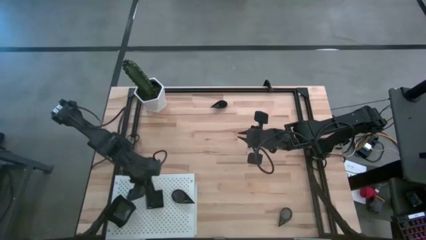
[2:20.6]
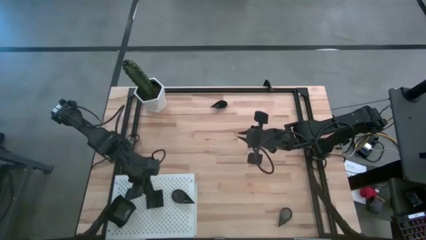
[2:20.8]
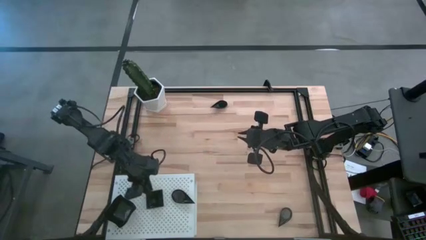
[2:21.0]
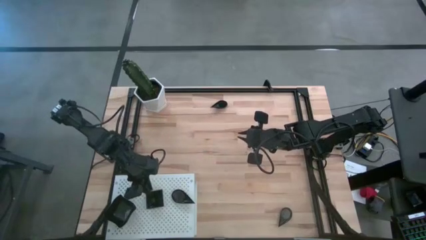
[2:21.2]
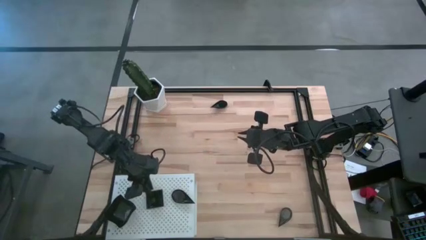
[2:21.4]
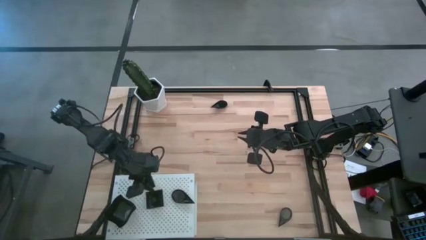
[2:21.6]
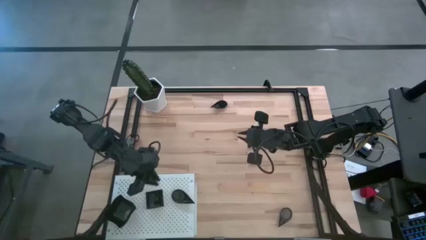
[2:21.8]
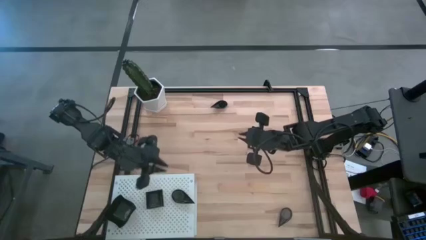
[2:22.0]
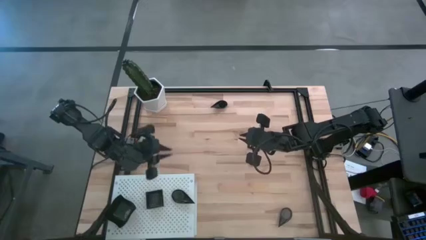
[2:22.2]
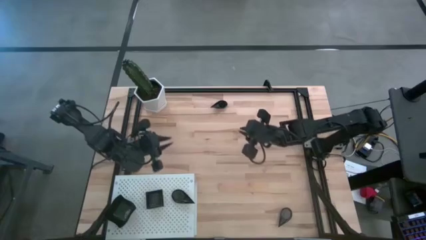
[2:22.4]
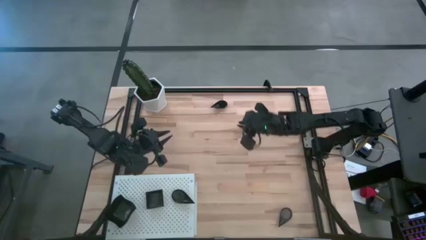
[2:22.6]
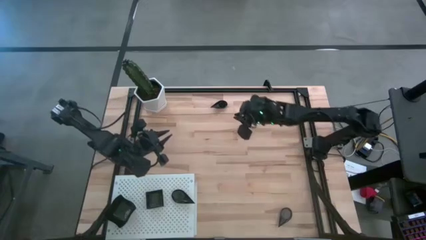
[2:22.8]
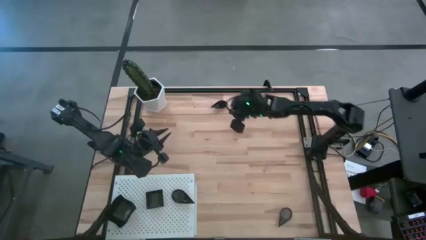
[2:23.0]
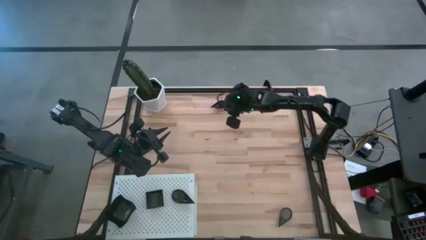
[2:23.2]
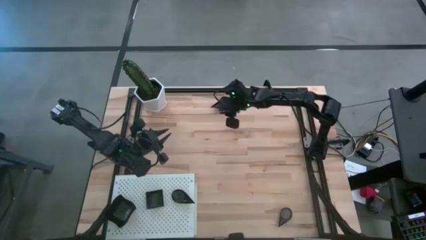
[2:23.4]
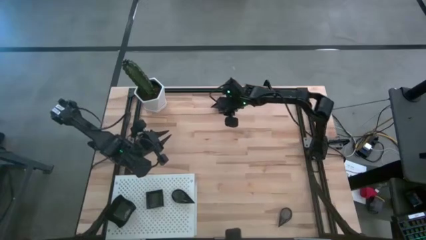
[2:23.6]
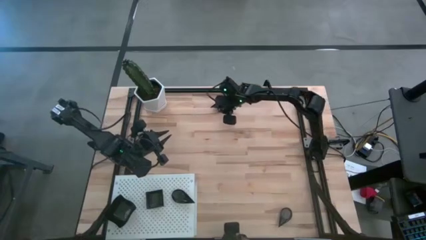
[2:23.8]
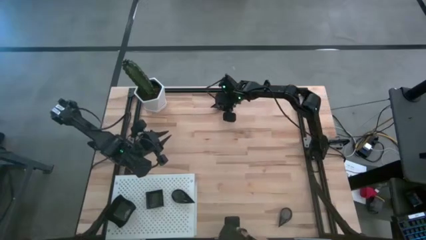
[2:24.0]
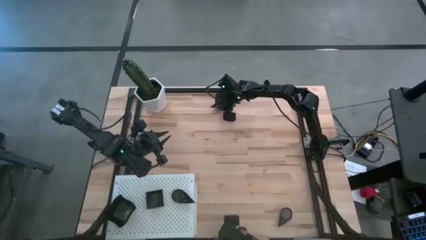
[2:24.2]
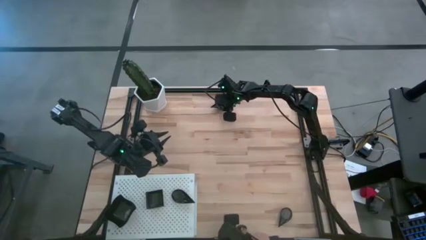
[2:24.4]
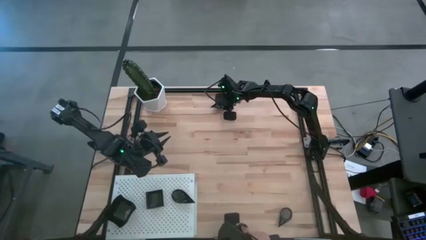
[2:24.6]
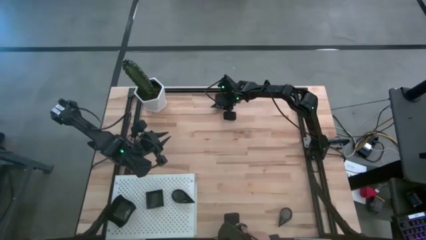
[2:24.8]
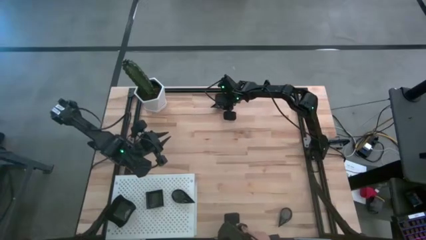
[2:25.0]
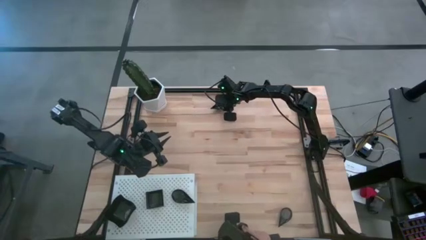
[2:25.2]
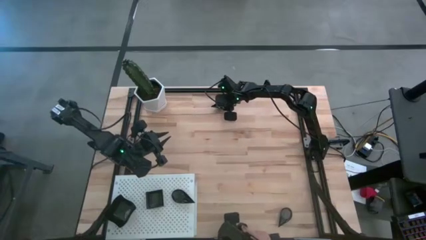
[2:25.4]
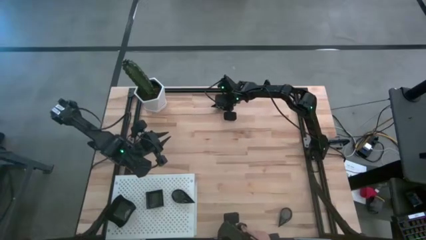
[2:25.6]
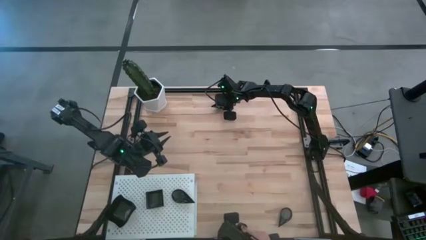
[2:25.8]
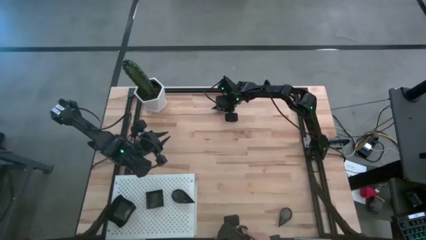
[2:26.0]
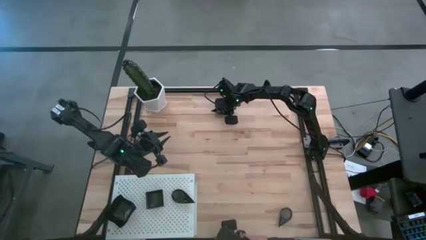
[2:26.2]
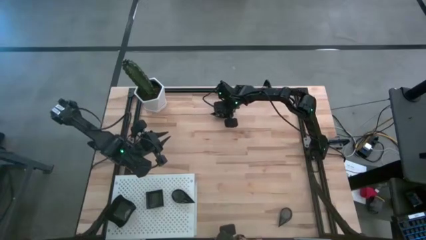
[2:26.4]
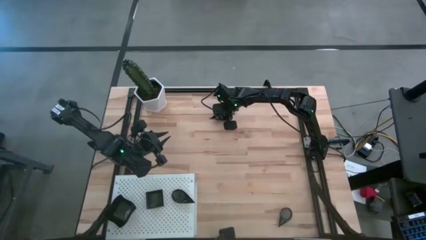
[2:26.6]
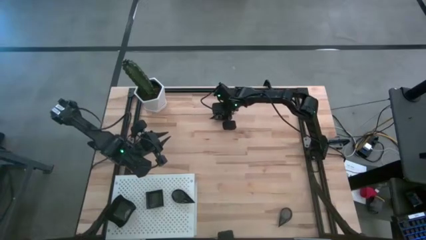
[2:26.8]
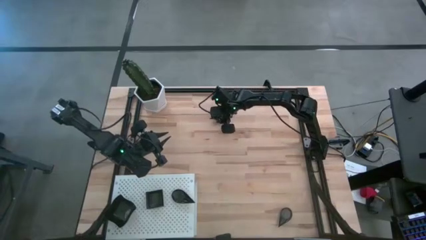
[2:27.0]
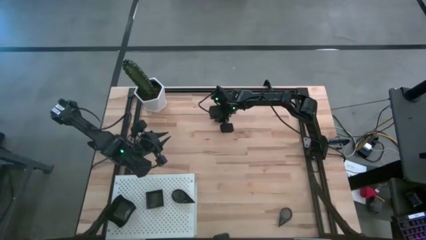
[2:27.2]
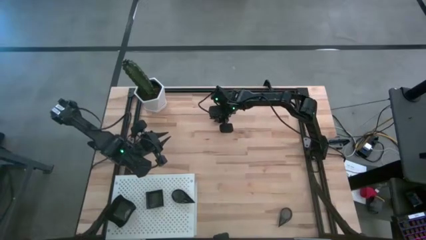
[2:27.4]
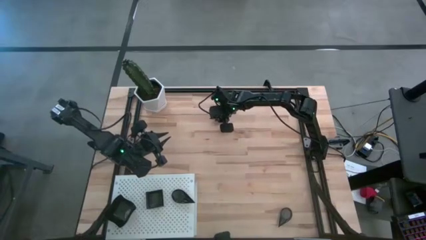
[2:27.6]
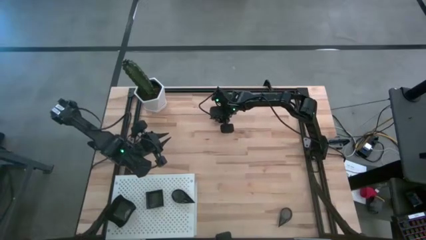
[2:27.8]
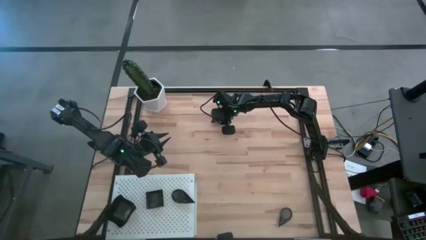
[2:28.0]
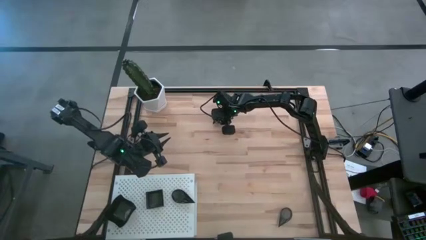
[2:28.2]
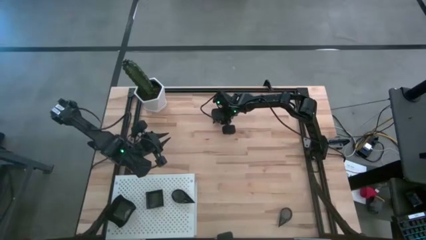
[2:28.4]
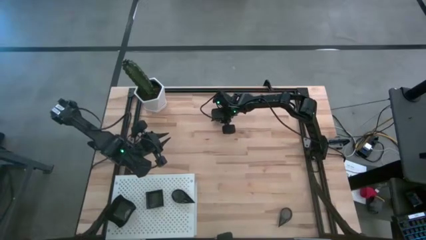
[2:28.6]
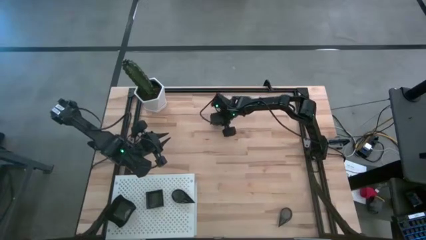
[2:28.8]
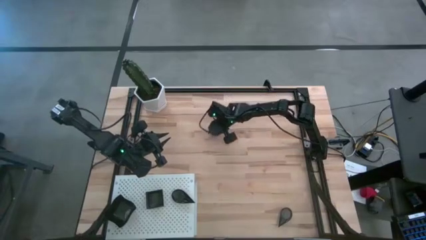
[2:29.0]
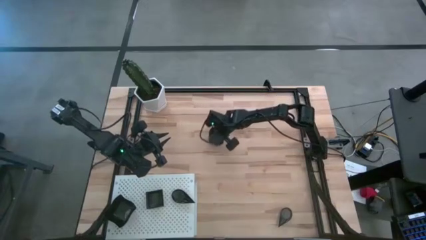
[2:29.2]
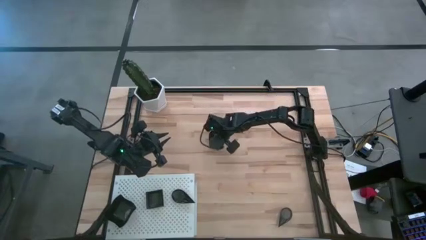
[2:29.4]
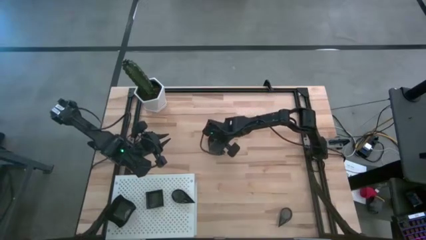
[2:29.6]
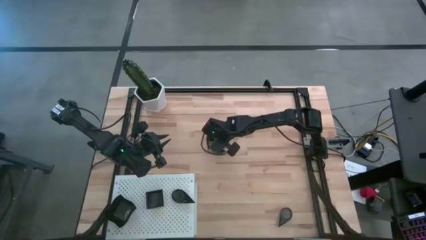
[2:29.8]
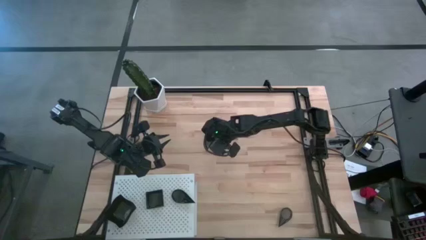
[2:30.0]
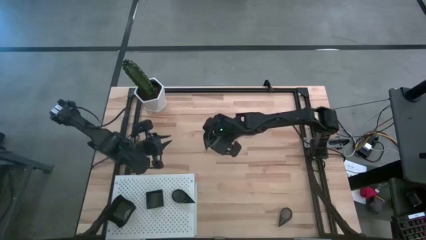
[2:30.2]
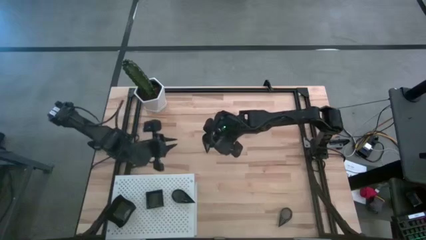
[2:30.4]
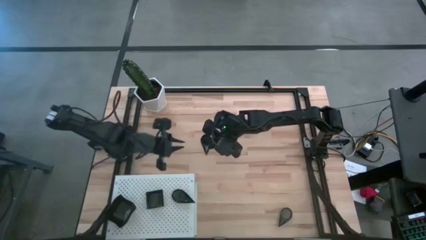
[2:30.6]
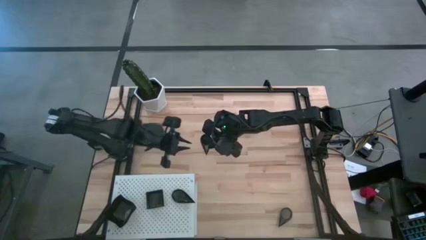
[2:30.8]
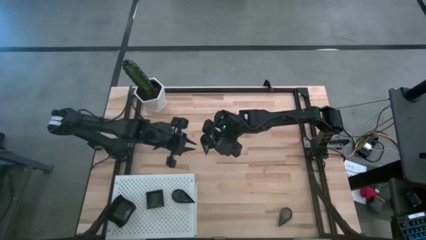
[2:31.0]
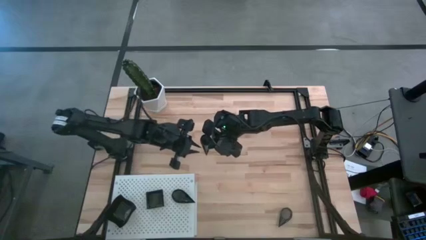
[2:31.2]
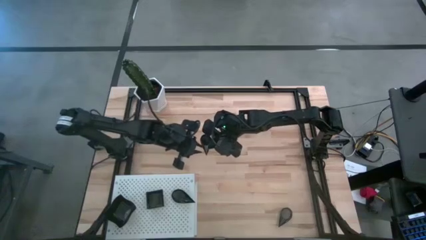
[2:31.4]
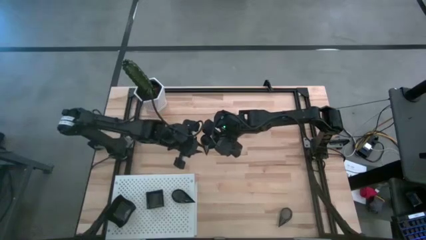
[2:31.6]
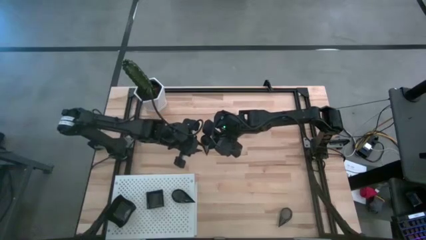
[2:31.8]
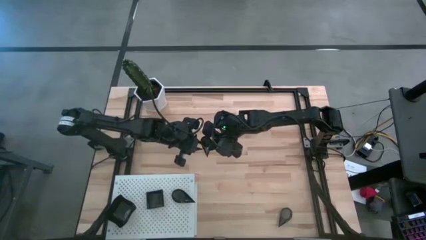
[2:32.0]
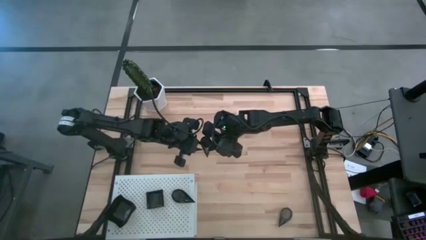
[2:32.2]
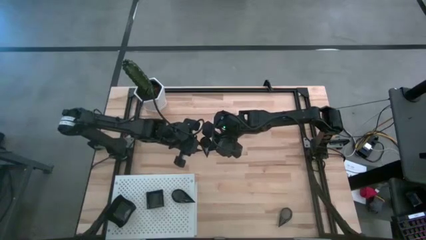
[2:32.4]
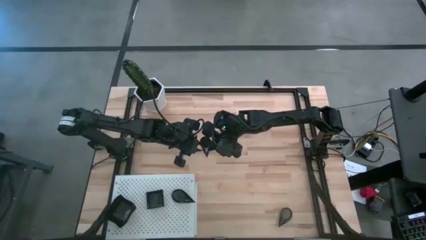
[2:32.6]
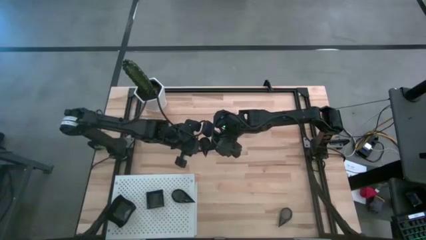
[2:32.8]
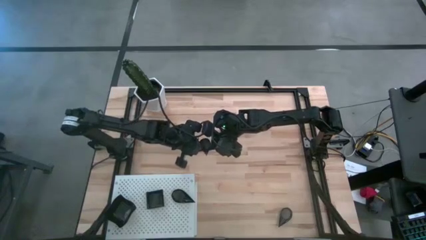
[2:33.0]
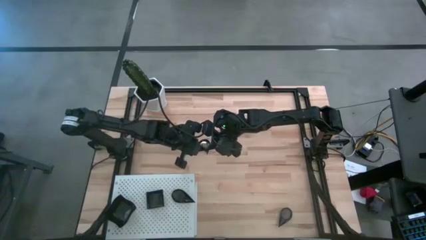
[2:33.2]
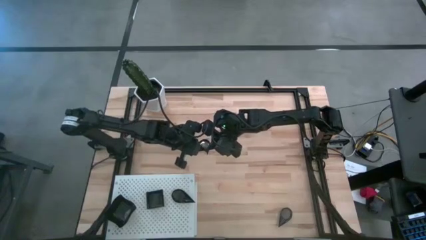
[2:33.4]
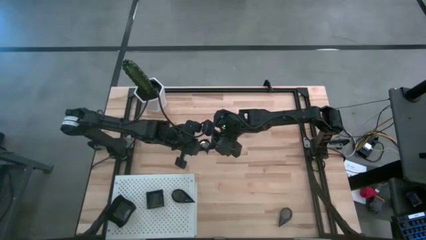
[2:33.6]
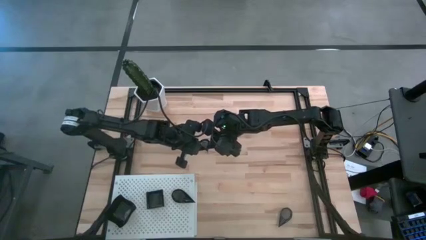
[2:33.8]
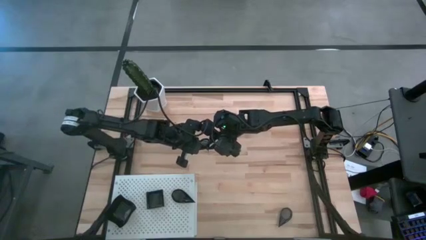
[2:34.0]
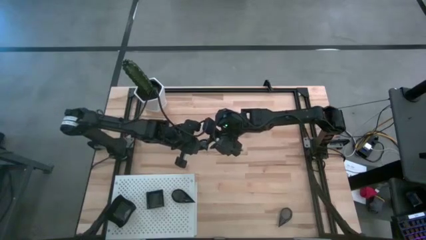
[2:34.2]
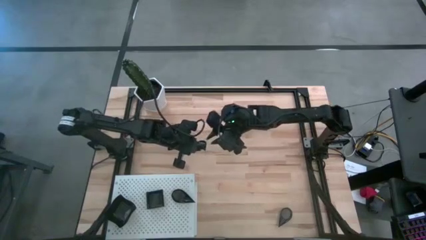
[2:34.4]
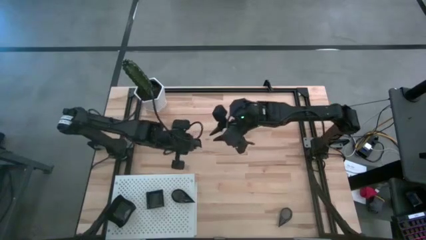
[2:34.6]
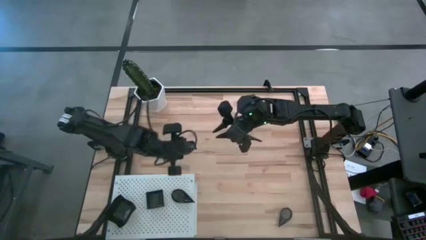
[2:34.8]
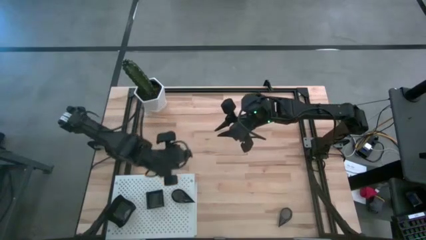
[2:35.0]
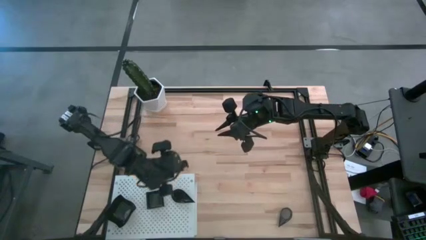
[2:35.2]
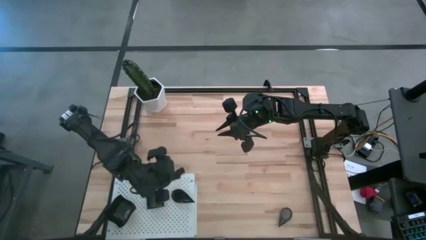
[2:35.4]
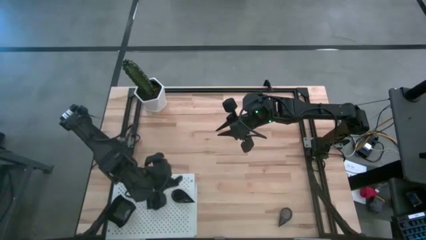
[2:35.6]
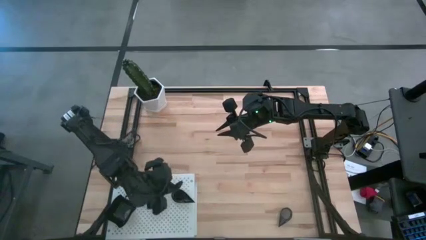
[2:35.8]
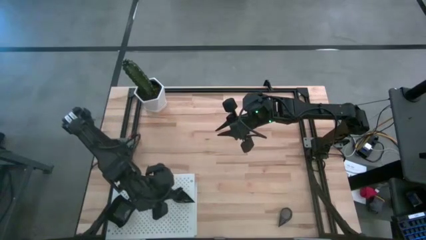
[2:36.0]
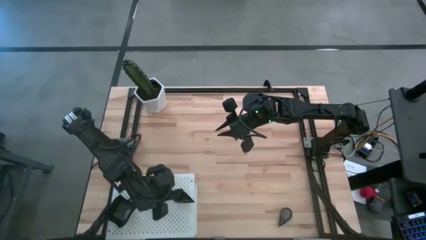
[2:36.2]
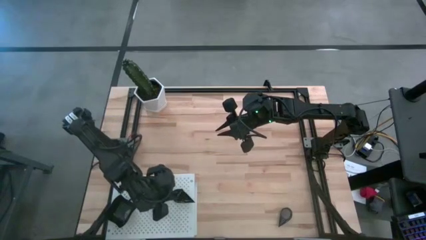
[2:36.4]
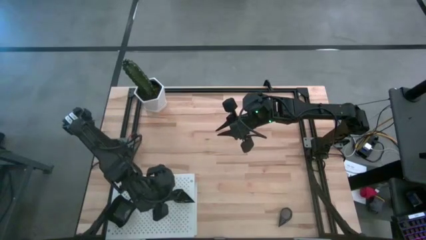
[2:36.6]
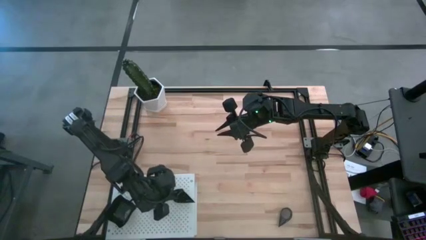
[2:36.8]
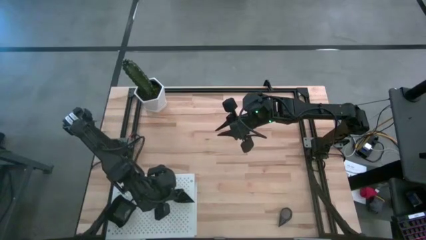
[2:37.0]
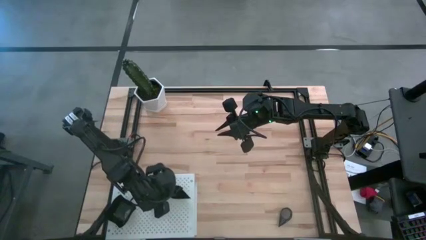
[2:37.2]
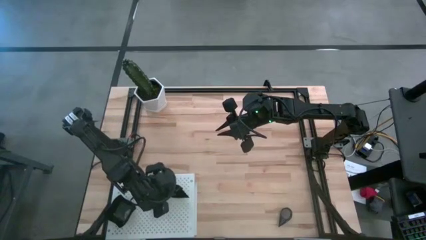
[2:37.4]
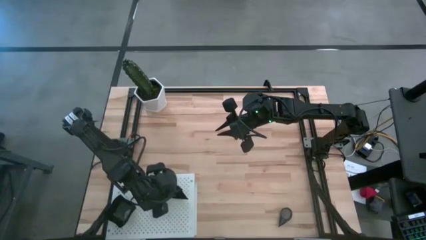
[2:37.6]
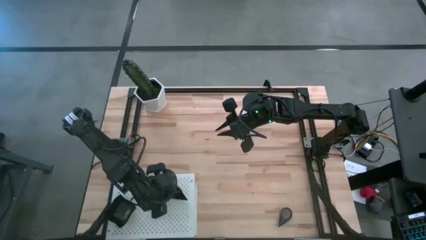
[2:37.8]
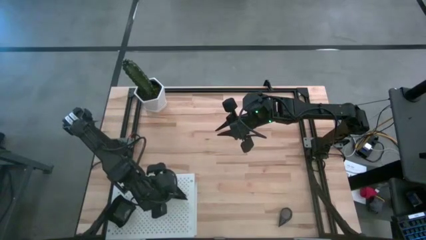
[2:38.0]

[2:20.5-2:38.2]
Task: Pick & Place Mini shaped plates
Stack the drop shaped plate on top of the other drop shaped plate on the shelf
